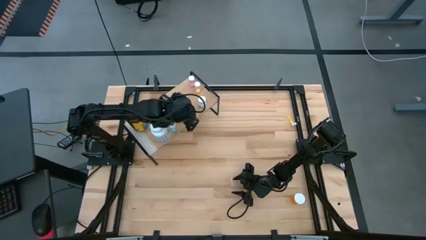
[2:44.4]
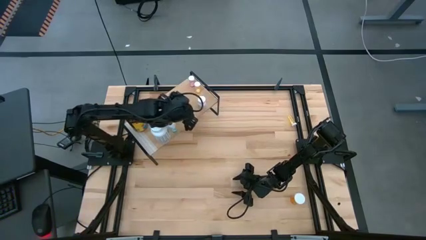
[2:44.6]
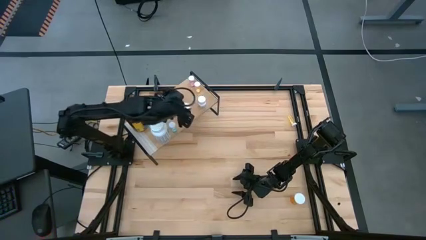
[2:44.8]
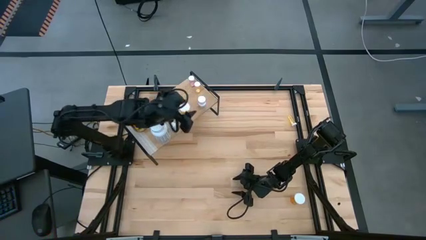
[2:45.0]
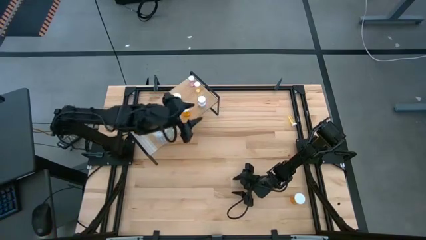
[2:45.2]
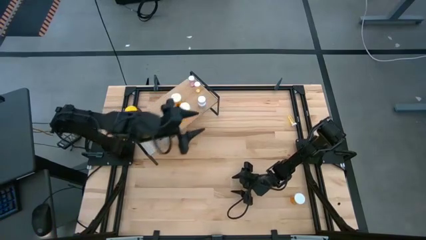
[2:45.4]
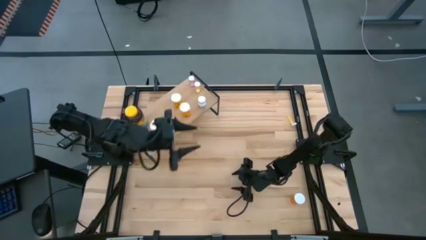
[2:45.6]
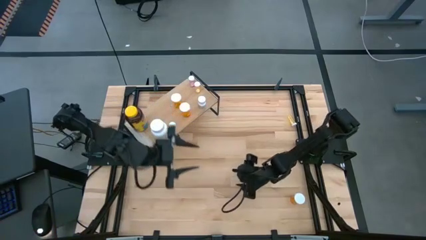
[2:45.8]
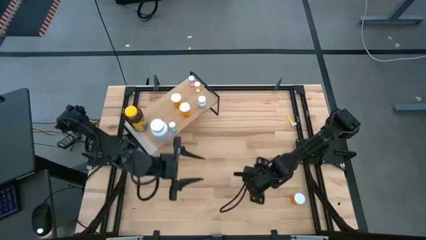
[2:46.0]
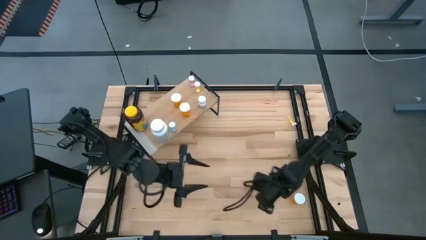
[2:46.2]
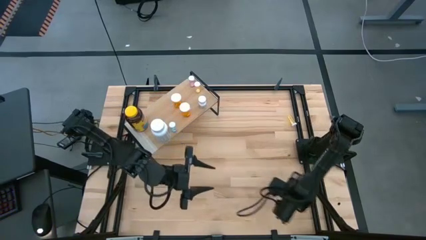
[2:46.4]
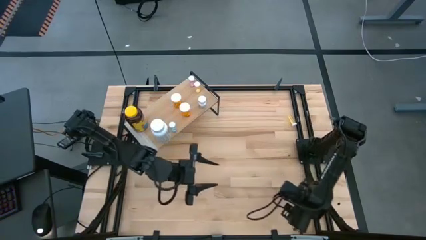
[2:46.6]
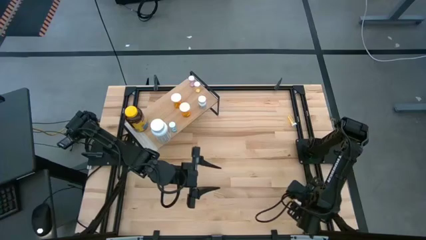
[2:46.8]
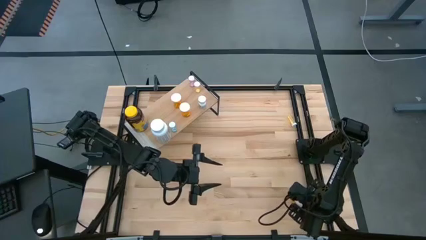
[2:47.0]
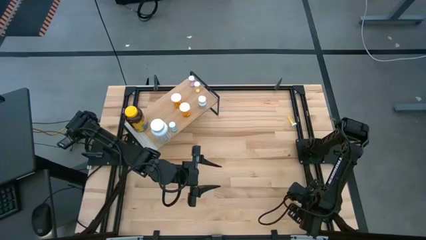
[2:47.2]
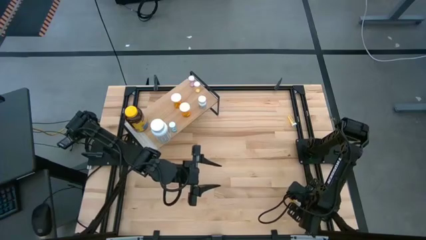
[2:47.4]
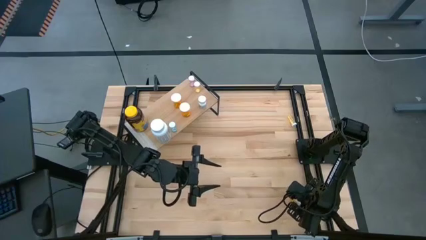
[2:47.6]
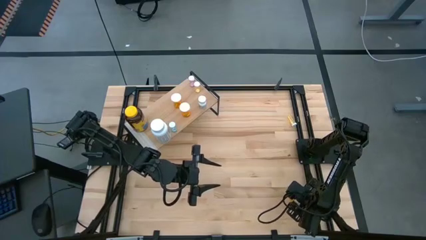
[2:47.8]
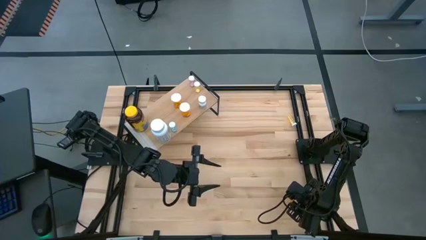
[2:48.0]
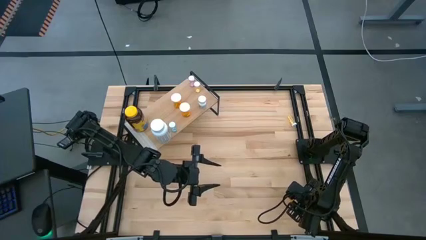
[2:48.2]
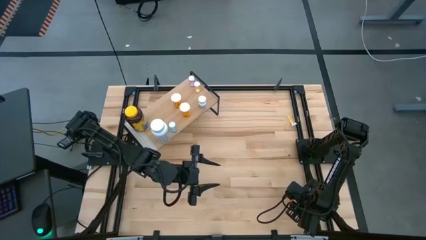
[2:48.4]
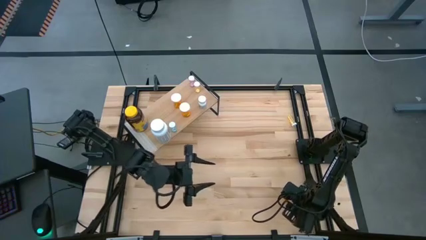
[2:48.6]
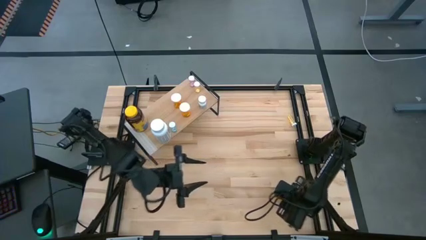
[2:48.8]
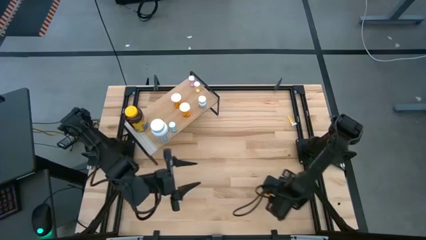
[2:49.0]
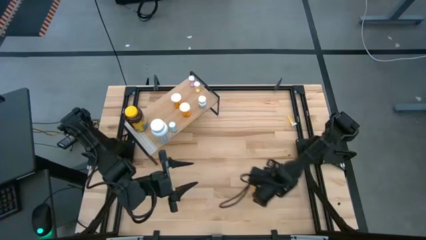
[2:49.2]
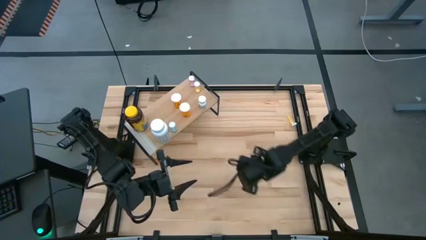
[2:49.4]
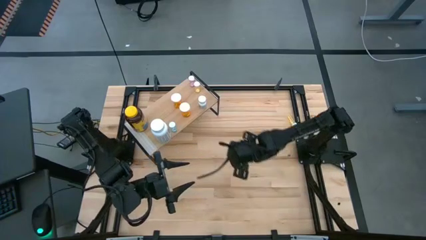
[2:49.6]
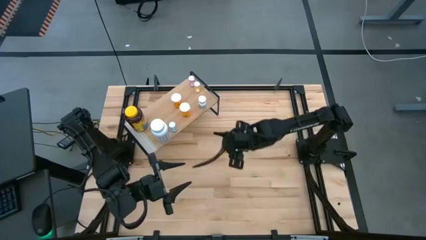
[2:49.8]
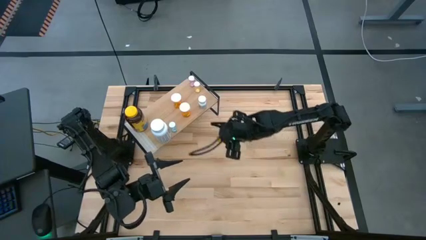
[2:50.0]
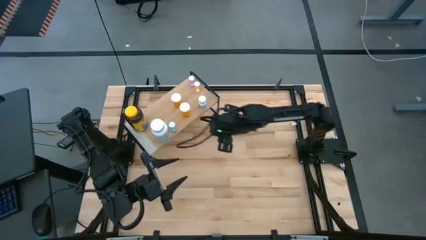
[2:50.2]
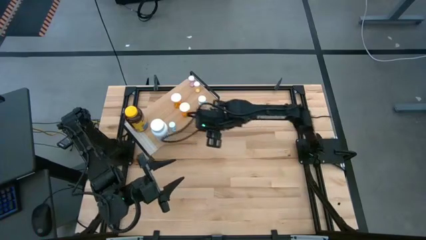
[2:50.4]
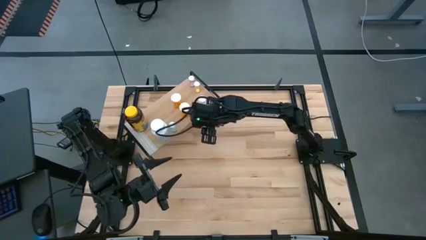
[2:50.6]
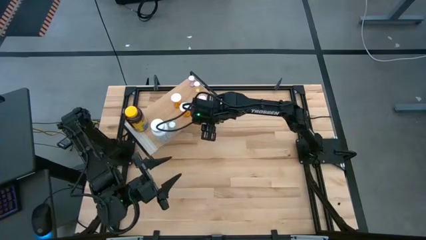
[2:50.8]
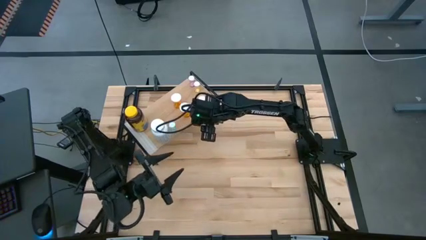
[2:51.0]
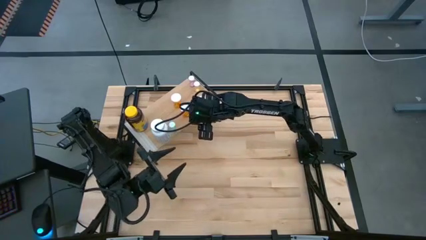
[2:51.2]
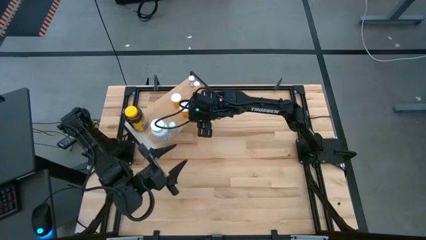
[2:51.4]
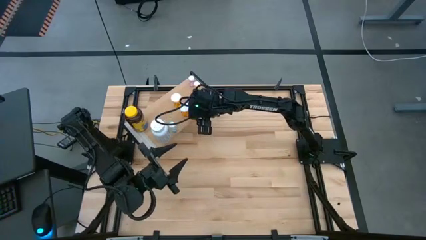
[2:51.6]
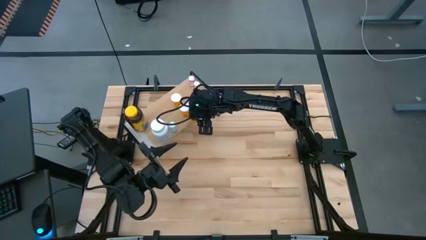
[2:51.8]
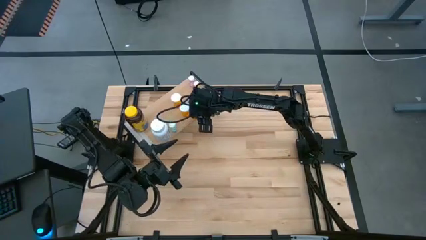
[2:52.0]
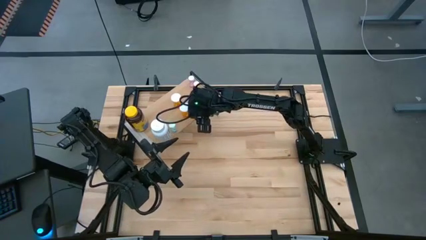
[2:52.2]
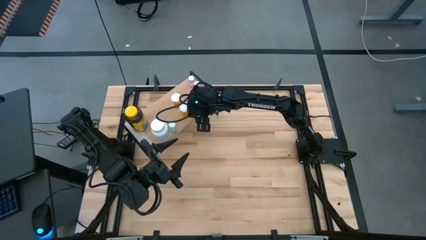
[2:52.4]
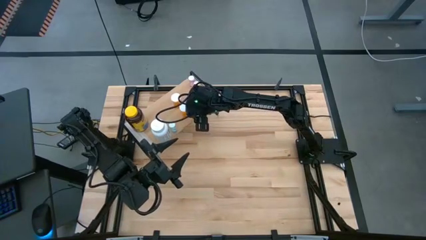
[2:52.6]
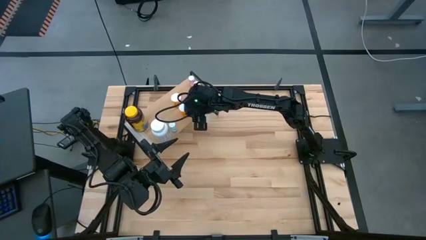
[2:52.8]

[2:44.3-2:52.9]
Task: Pick and place medicine bottles onto shelf by color
Put the orange pill bottle on the shelf

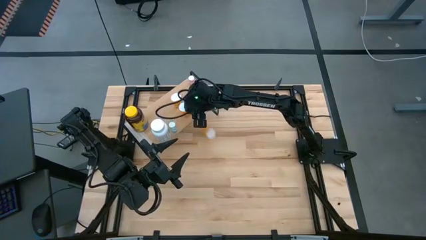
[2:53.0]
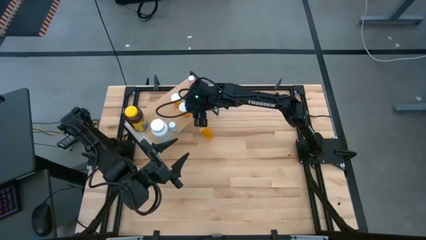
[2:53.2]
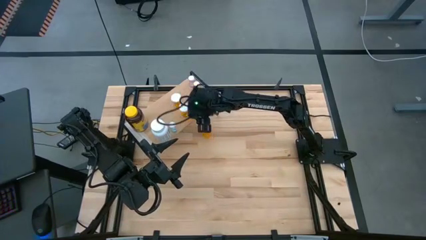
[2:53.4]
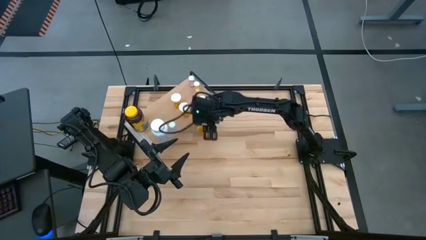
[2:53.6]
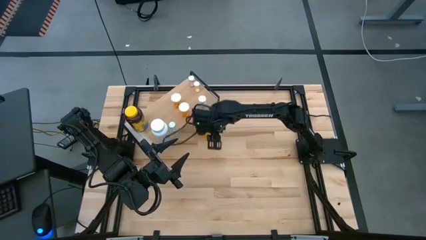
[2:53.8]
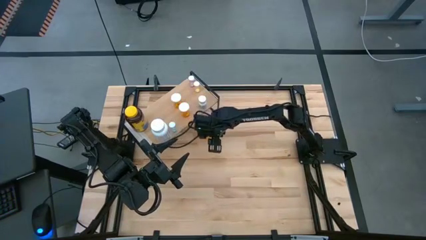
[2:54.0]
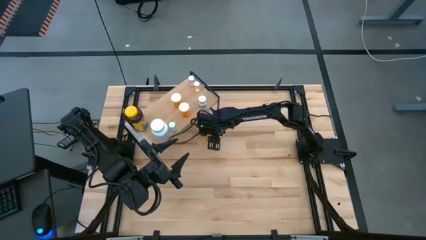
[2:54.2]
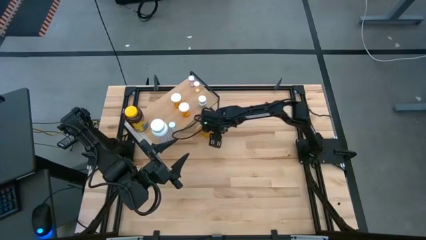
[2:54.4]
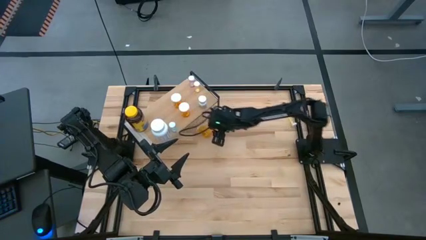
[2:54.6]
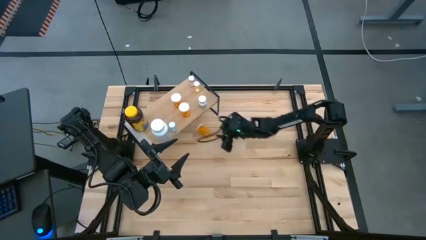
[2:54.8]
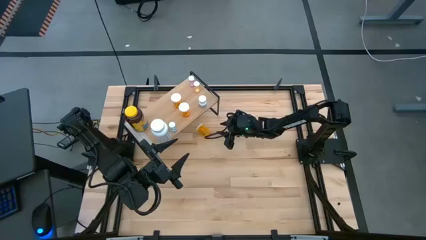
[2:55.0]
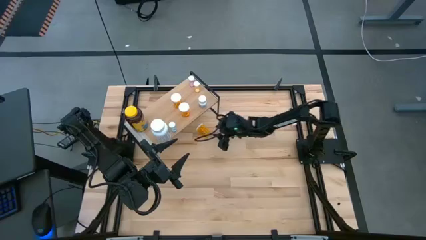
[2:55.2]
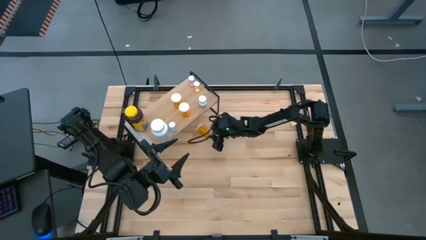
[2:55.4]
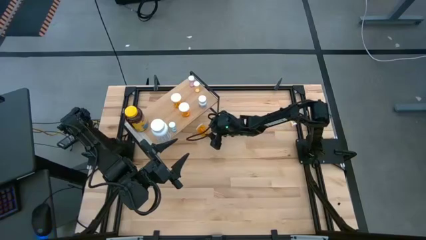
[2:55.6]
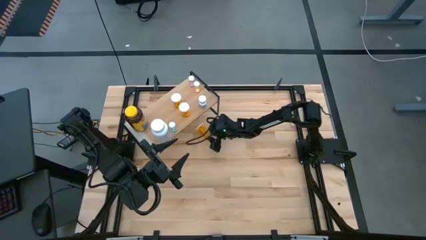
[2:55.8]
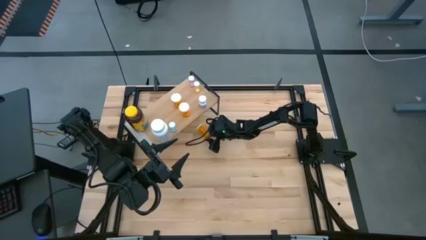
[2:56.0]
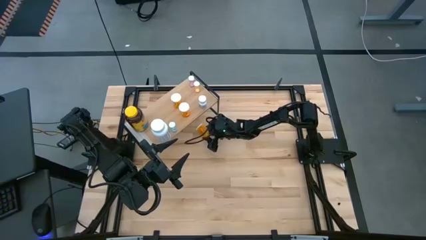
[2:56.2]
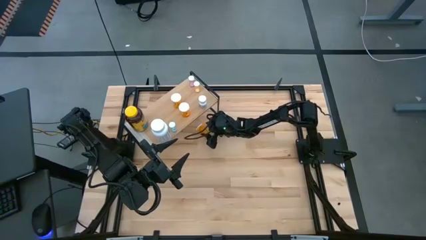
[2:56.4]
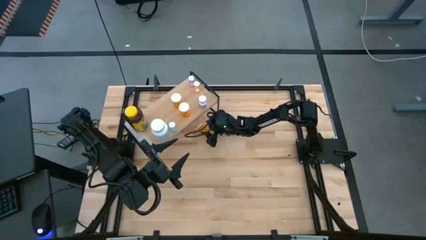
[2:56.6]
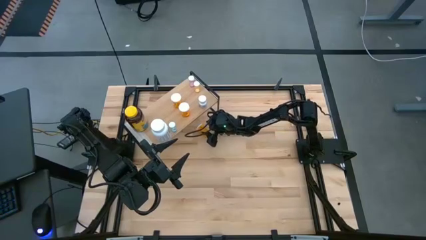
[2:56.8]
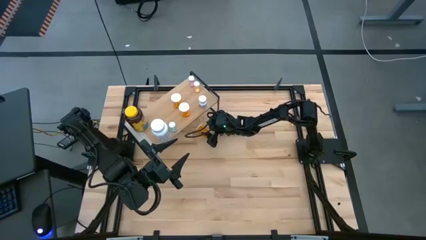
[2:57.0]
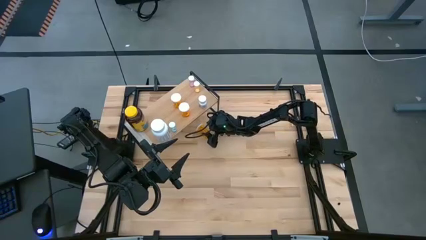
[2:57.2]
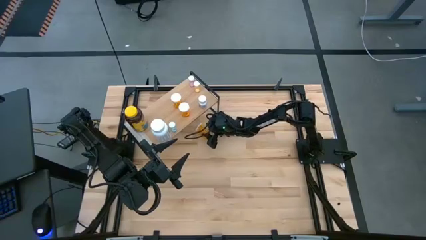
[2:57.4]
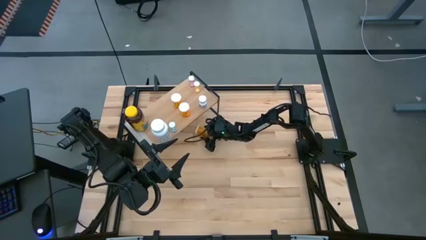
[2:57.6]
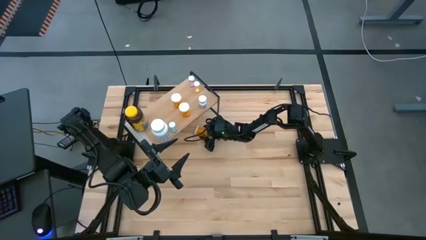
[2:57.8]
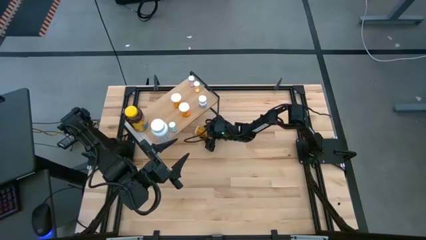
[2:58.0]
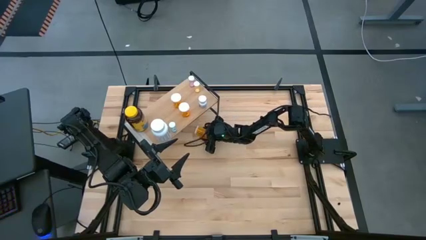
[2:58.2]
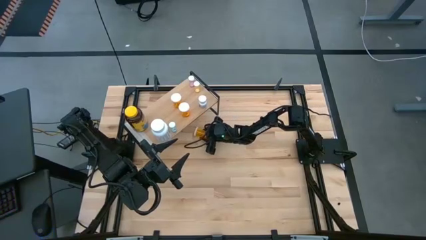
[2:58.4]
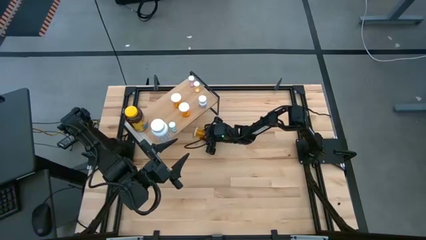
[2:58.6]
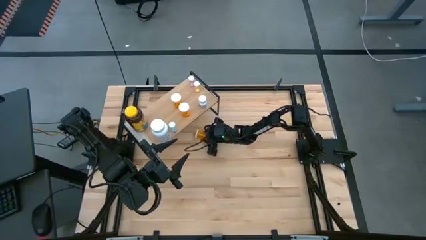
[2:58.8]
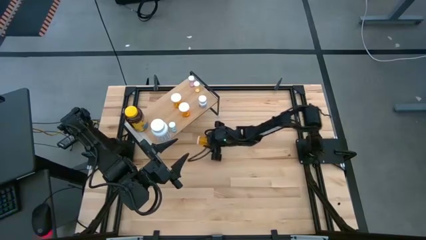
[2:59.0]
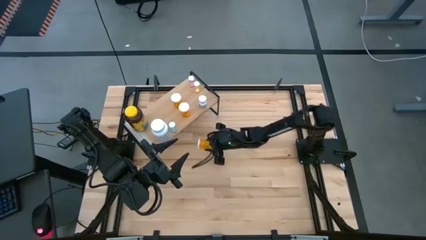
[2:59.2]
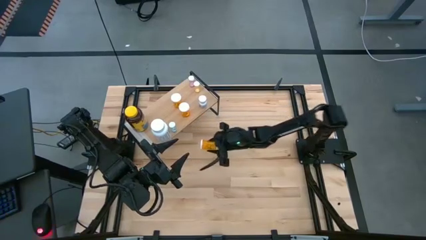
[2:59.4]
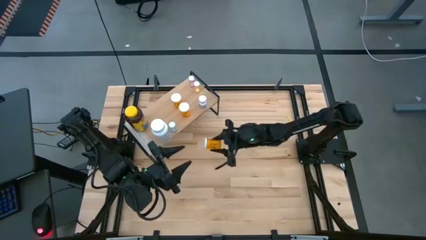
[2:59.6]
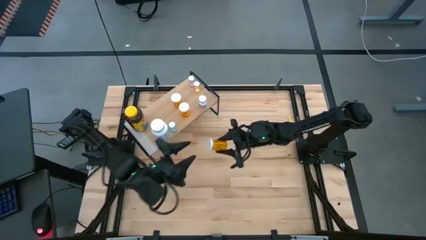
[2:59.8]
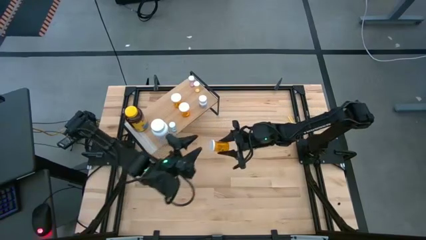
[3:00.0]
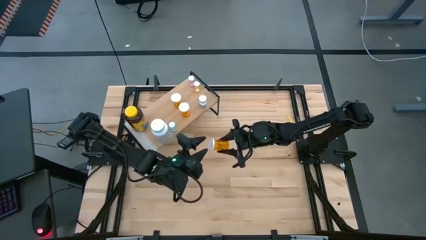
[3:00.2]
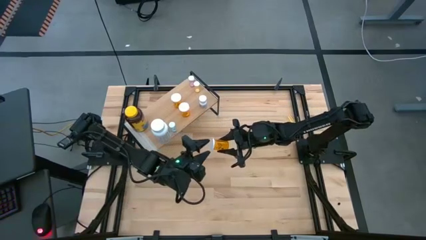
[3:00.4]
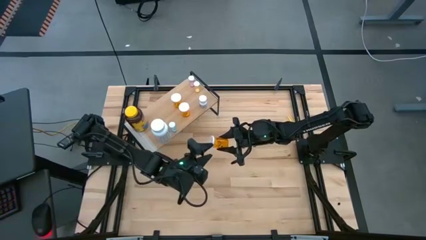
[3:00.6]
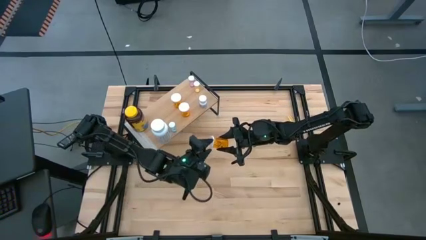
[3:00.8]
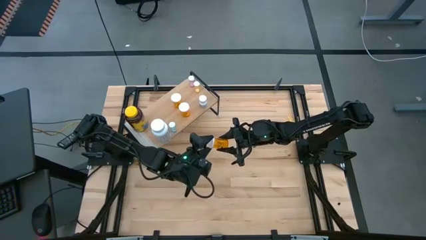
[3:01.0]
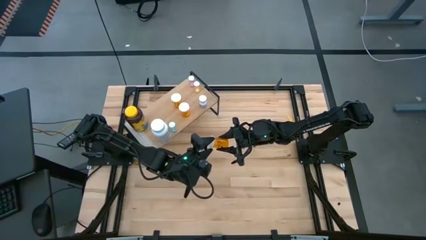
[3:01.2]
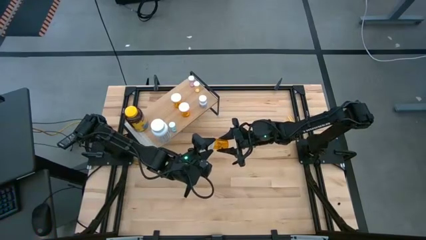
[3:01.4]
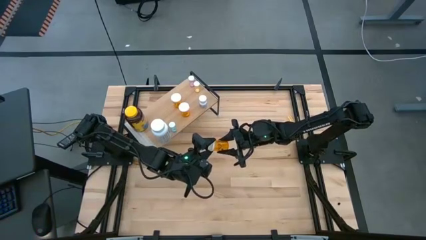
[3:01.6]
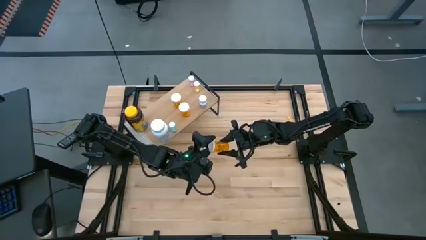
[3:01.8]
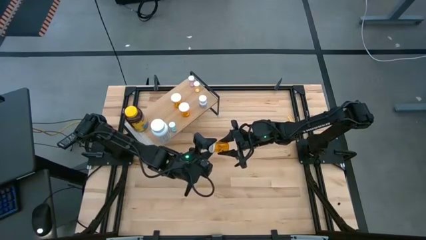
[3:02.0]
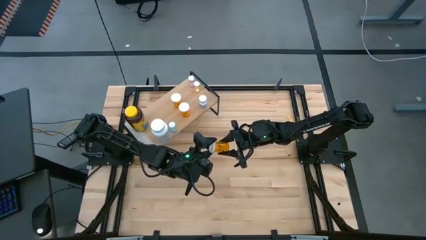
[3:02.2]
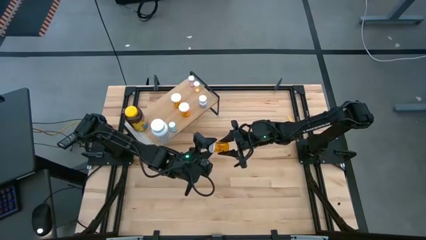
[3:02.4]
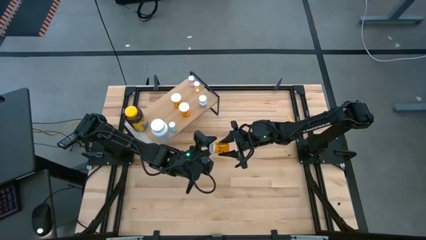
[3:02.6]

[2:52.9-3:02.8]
Put the orange pill bottle on the shelf
